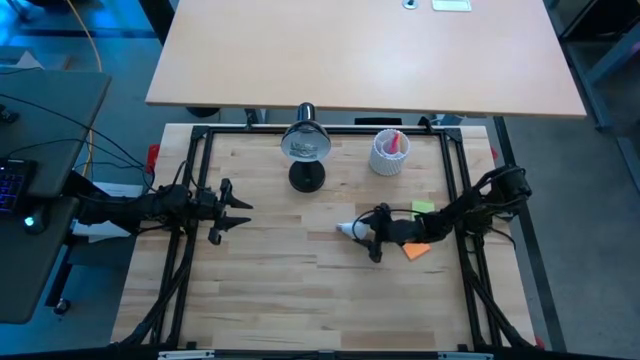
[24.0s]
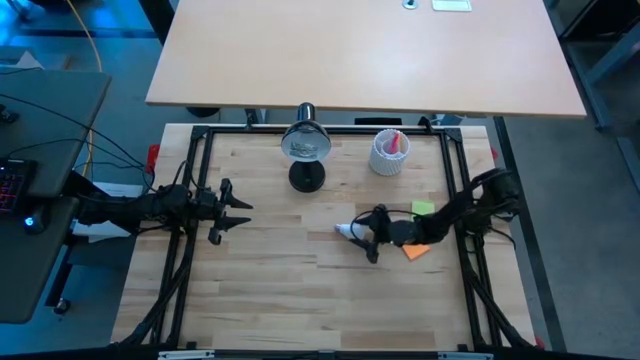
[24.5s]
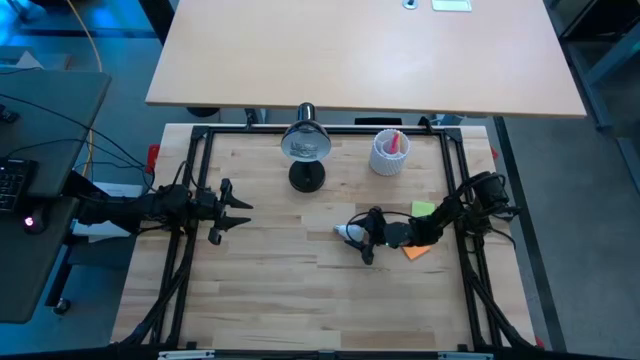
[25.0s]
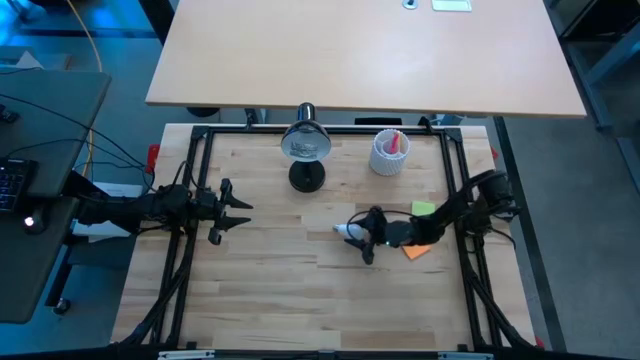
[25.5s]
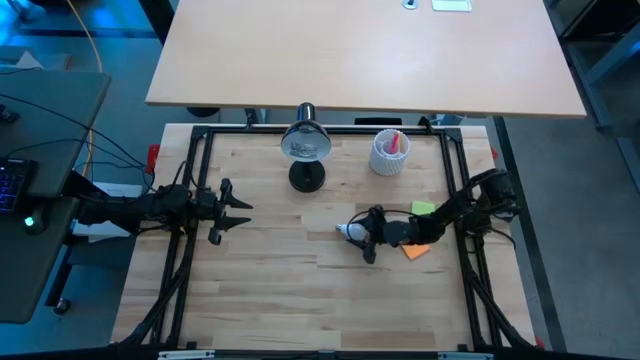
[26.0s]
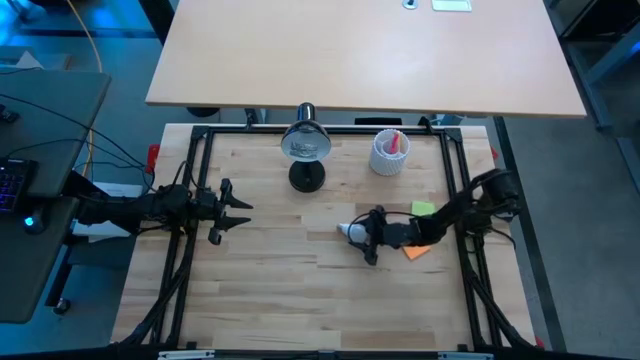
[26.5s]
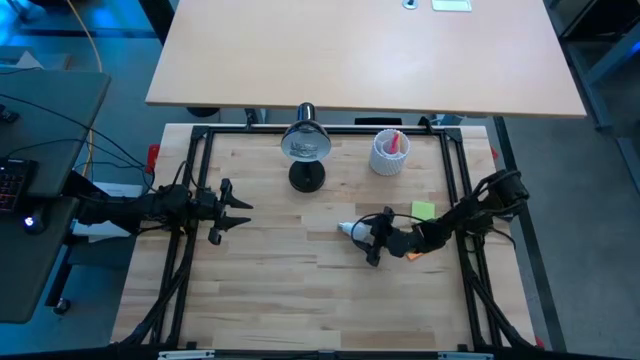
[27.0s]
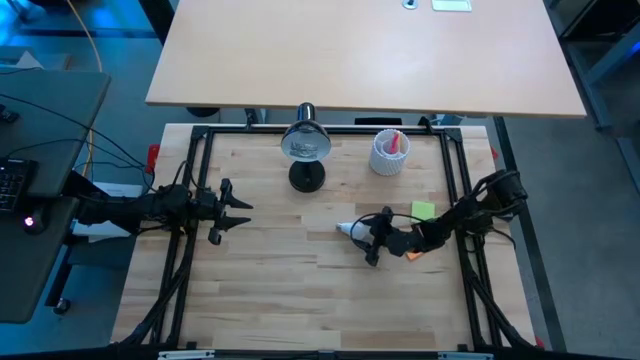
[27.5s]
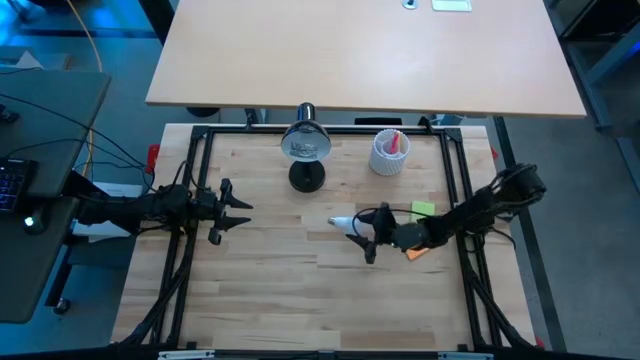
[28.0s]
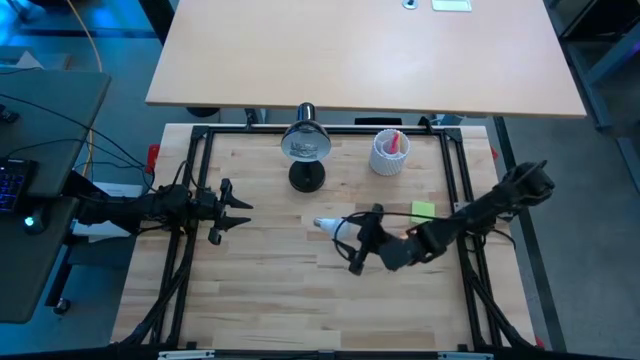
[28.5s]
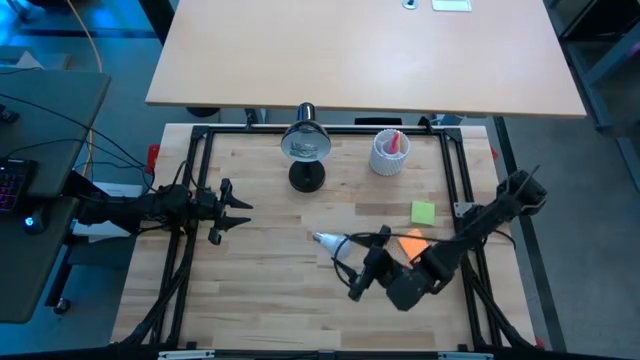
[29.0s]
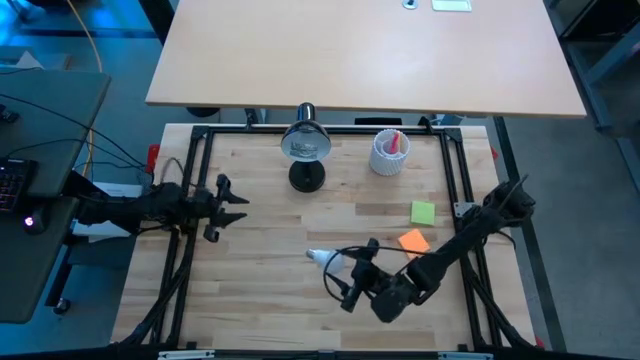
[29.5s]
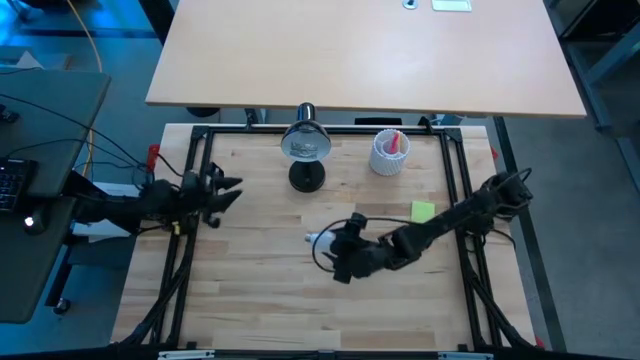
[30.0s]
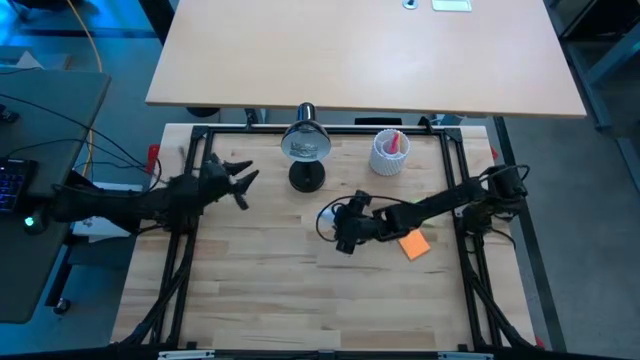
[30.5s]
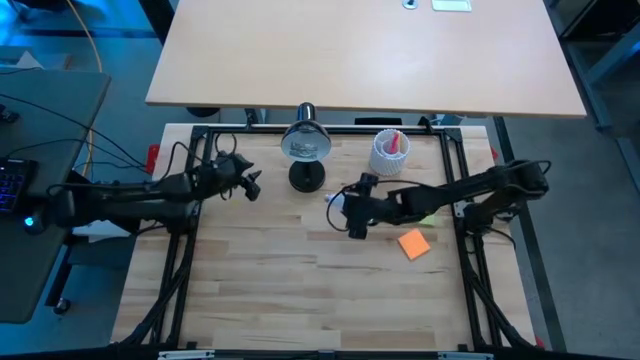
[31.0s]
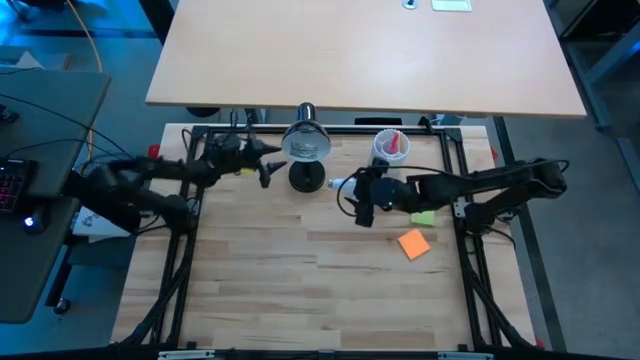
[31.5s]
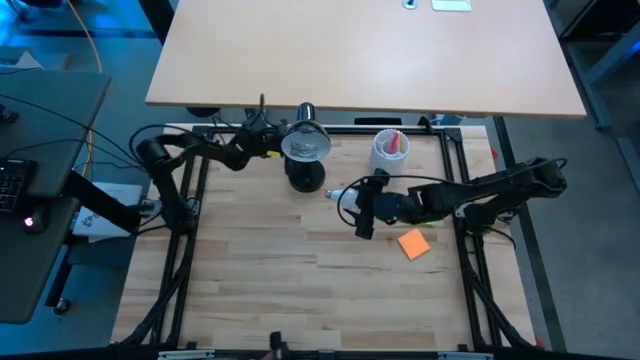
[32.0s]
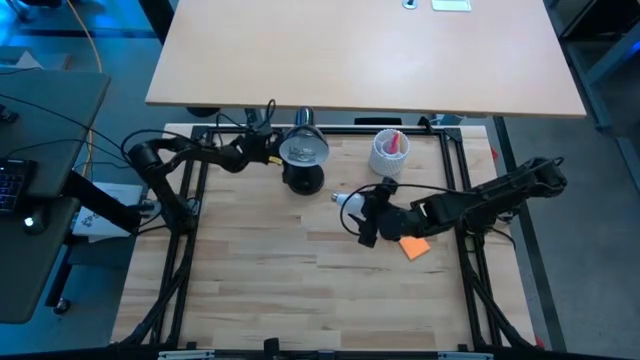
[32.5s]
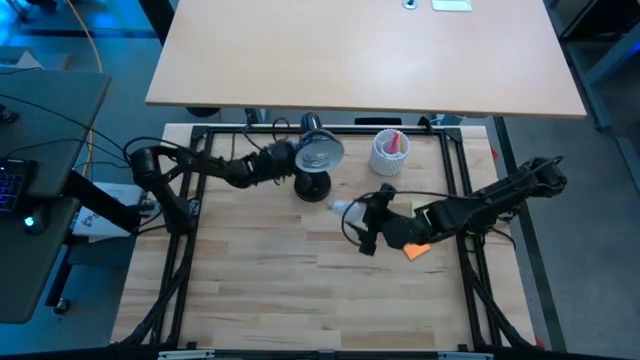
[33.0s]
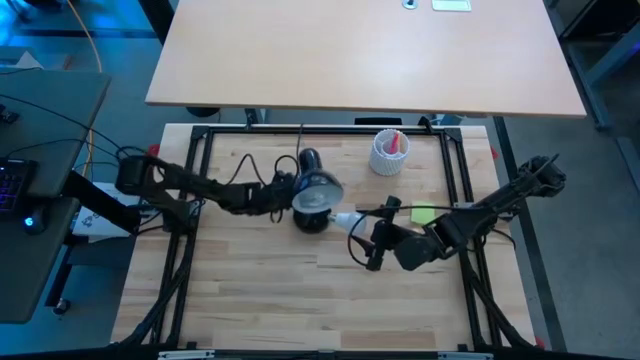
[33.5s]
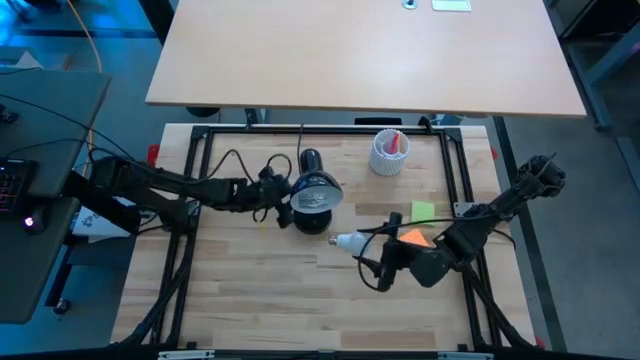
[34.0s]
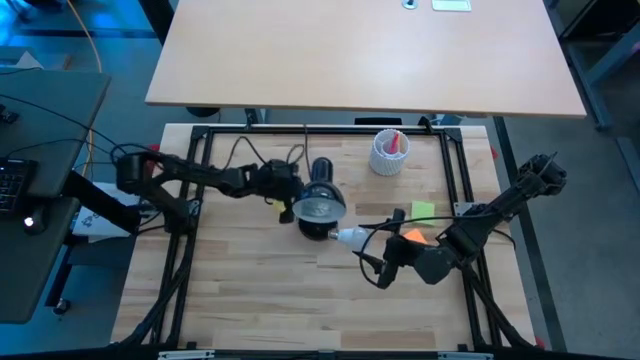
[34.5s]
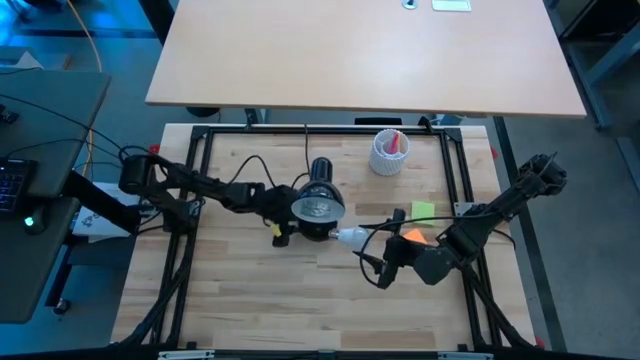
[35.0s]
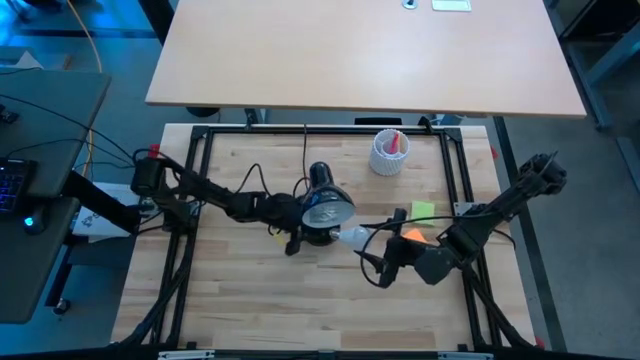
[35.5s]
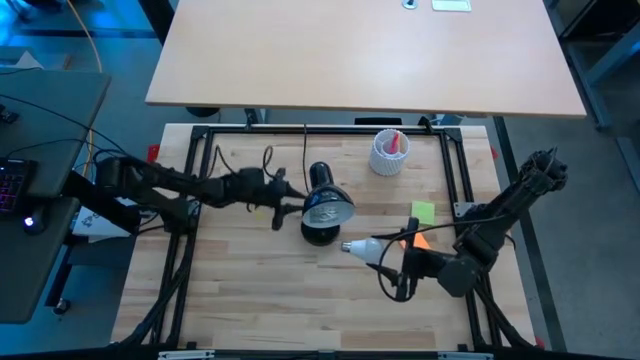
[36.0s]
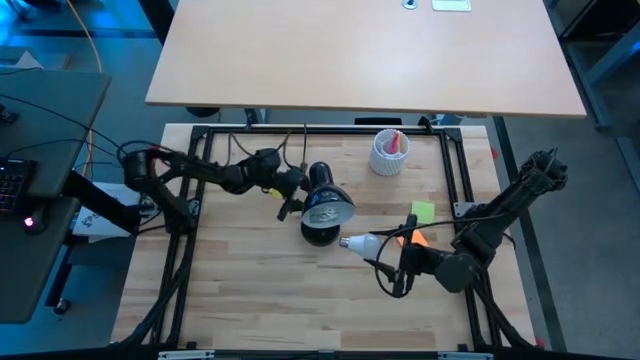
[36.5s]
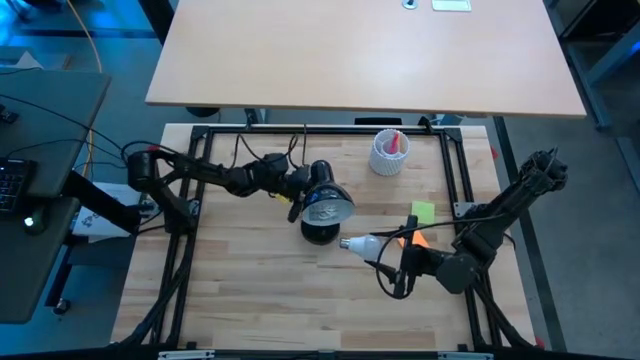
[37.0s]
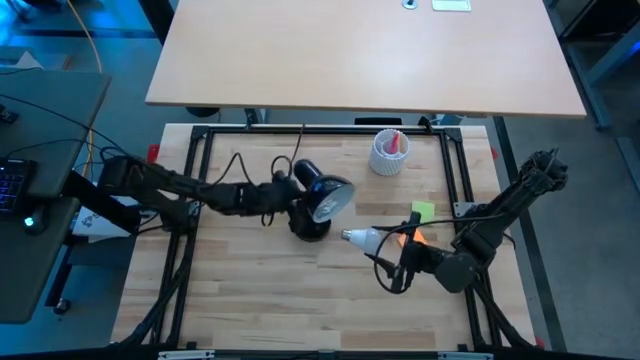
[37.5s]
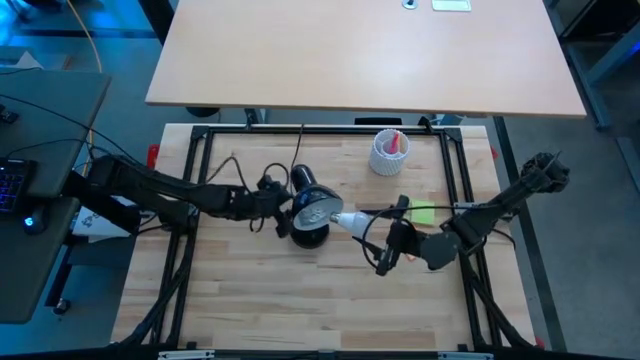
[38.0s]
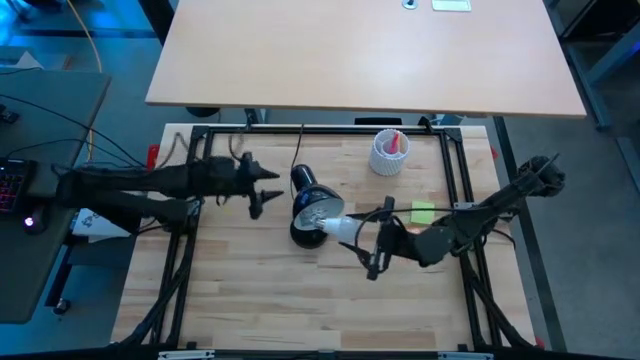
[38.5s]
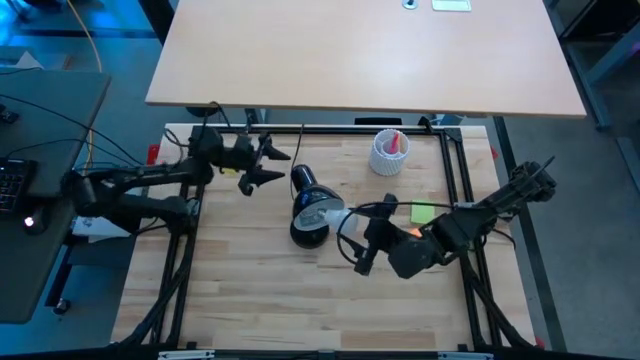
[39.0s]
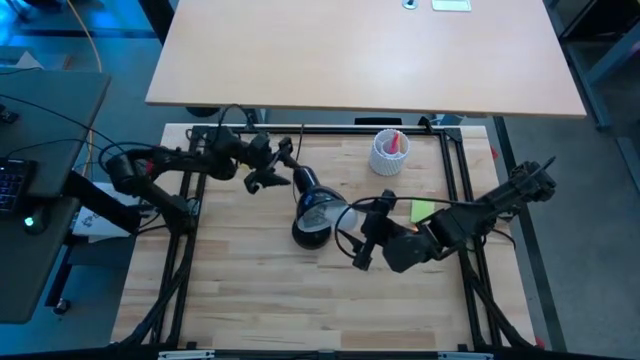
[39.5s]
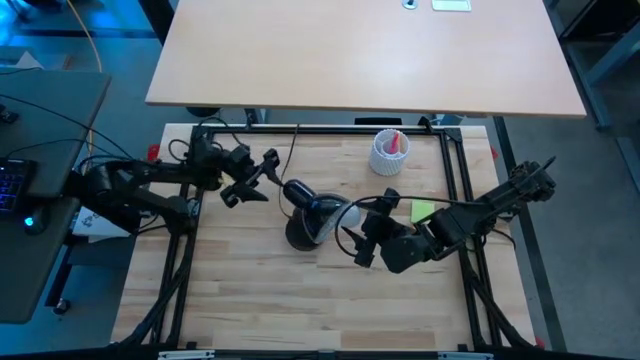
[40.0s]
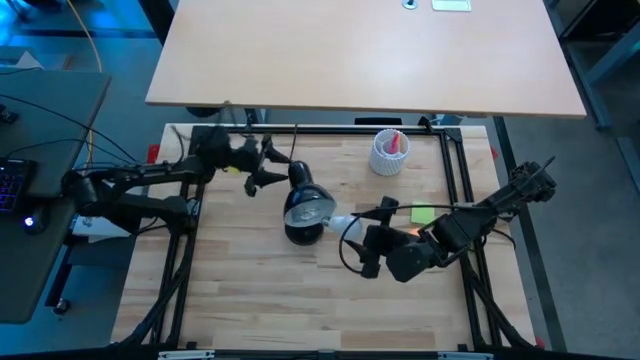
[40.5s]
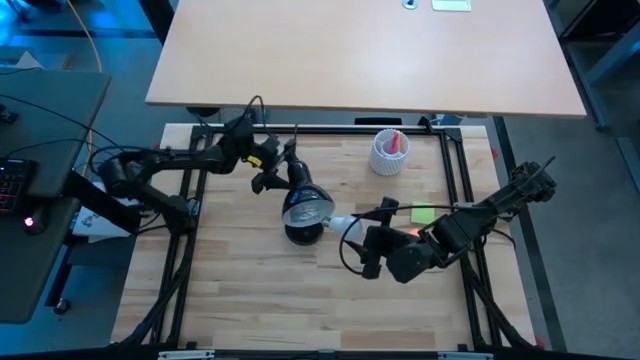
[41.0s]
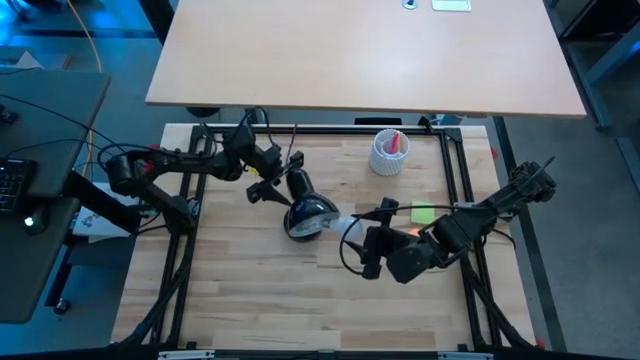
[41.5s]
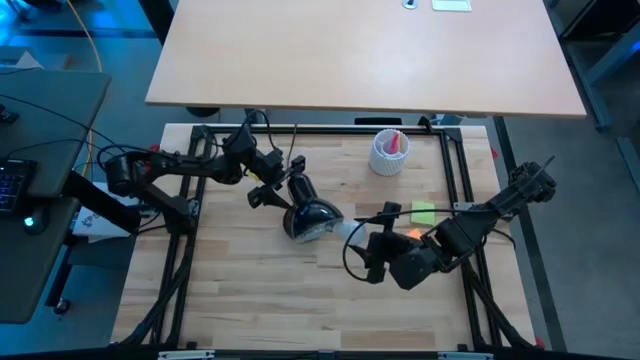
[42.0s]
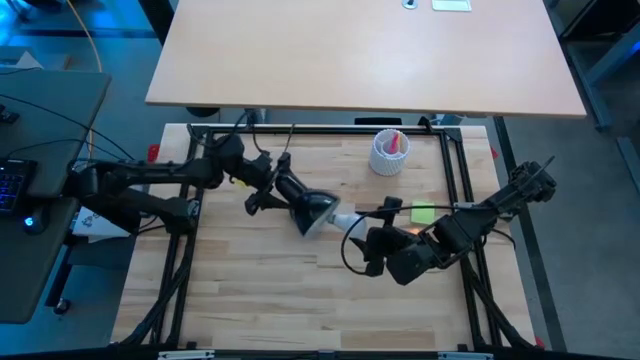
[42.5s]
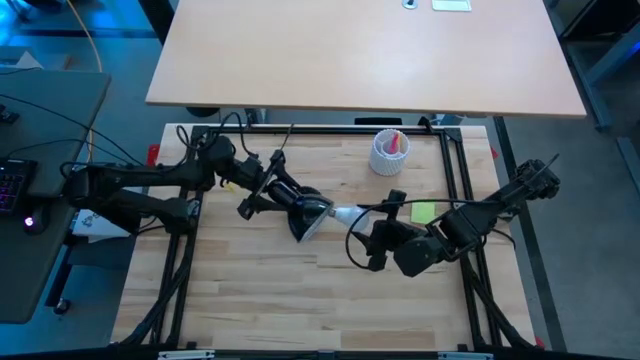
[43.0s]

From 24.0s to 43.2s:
Task: Screw lightbulb
Insert the lightbulb into the desk lamp

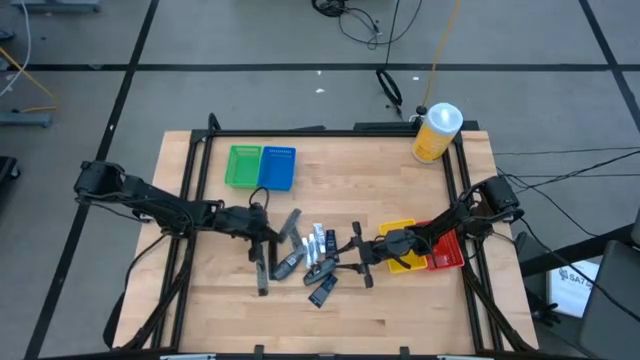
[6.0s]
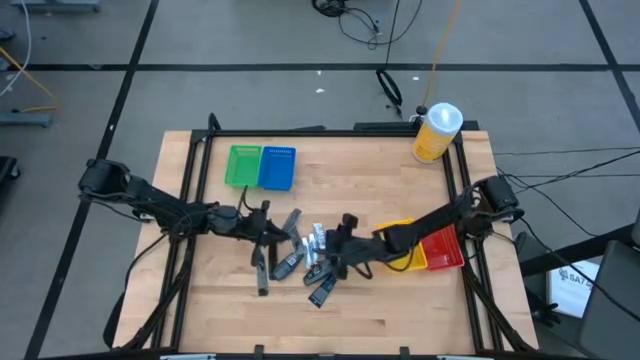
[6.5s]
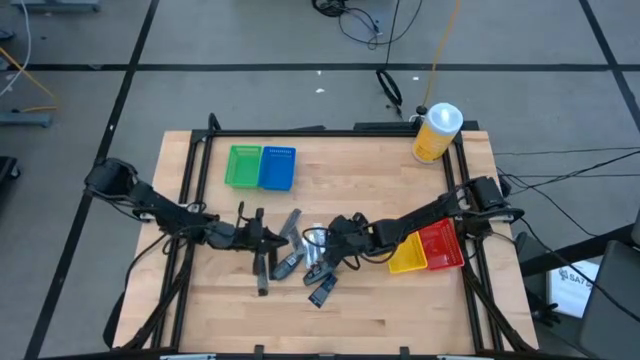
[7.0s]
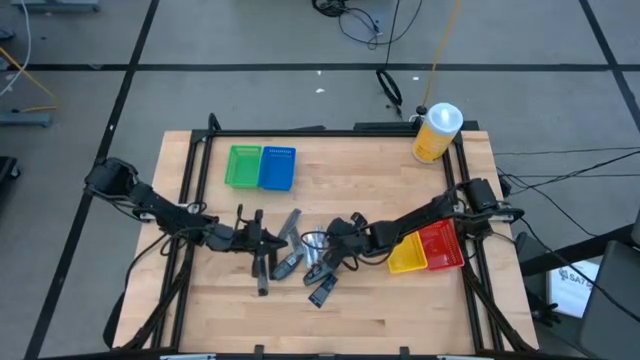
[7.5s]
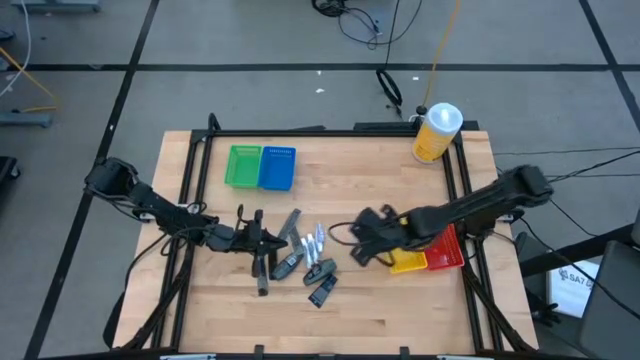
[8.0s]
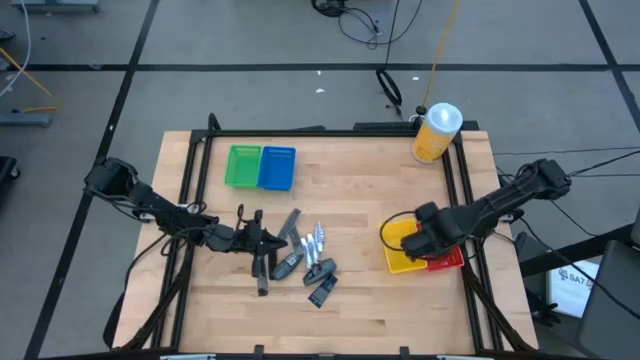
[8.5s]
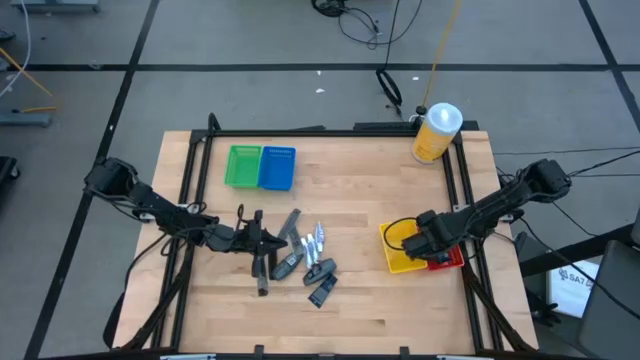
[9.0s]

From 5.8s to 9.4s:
Task: Pick & Place Travel size toiletries
Put the black shaving cream into the red bin
